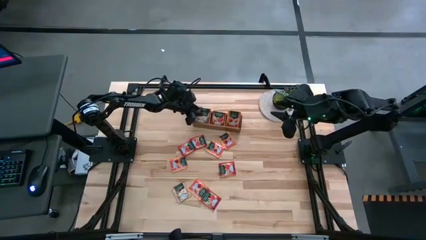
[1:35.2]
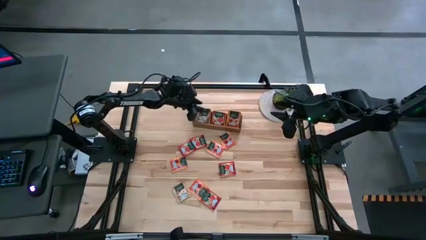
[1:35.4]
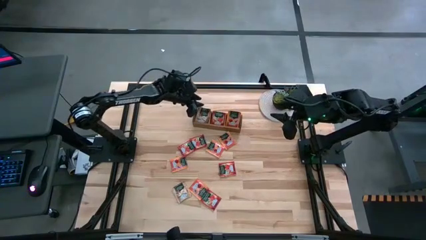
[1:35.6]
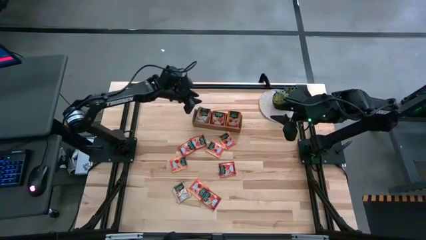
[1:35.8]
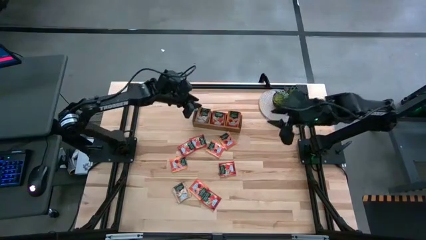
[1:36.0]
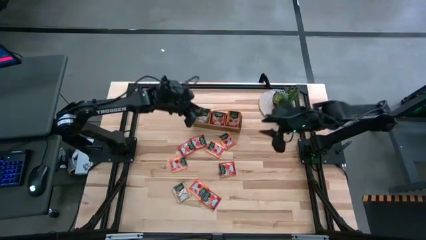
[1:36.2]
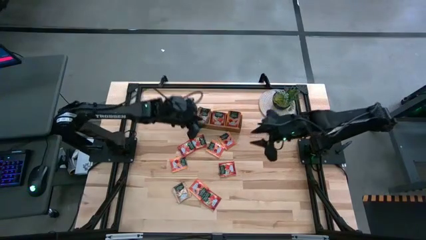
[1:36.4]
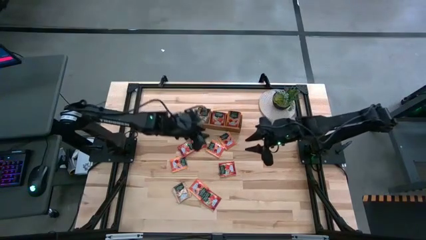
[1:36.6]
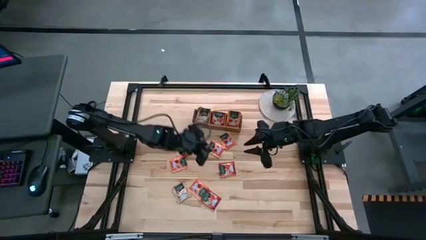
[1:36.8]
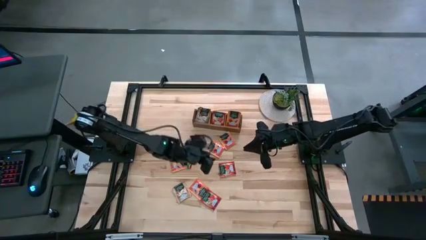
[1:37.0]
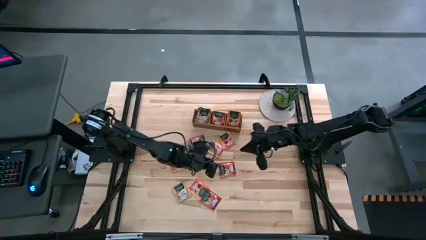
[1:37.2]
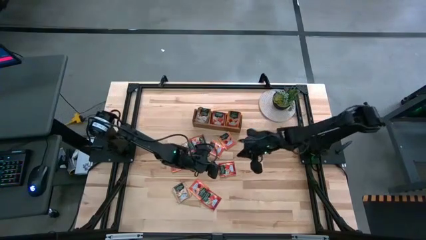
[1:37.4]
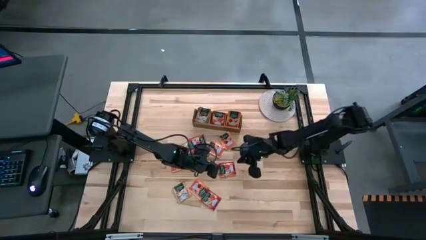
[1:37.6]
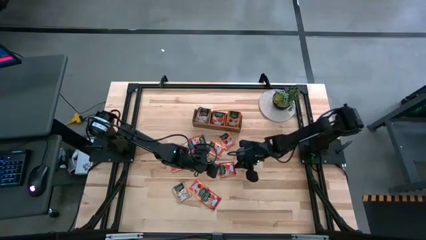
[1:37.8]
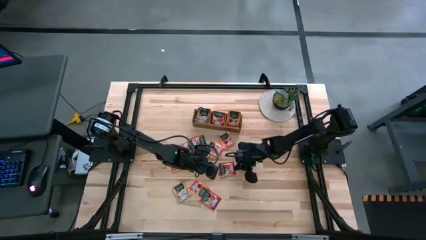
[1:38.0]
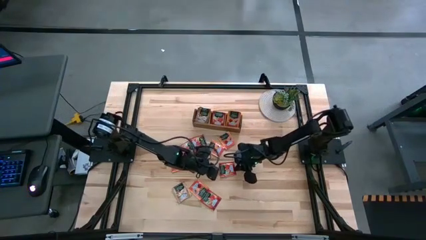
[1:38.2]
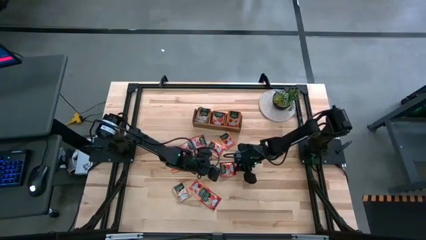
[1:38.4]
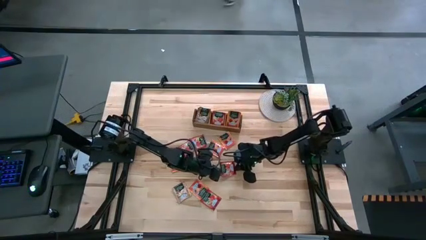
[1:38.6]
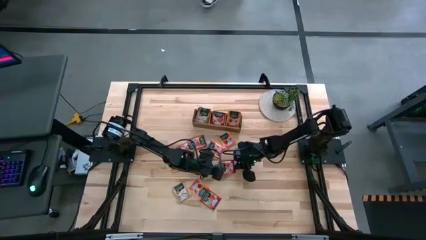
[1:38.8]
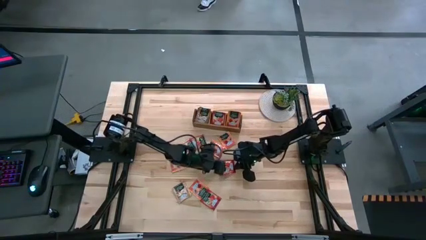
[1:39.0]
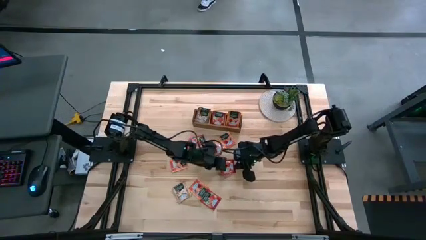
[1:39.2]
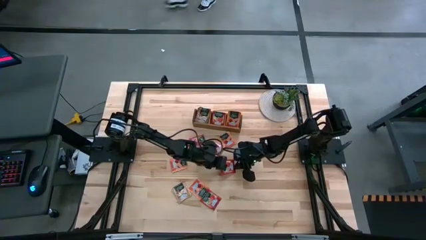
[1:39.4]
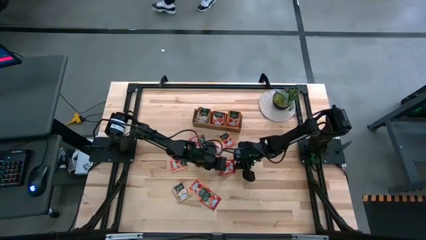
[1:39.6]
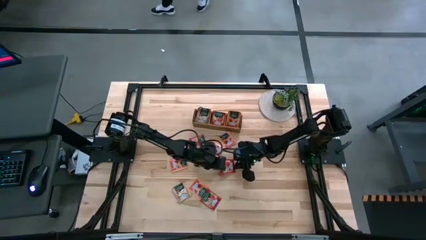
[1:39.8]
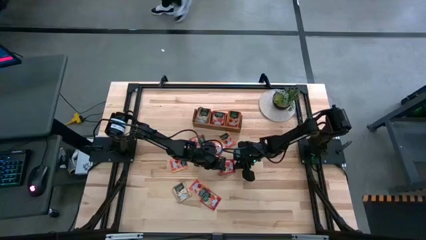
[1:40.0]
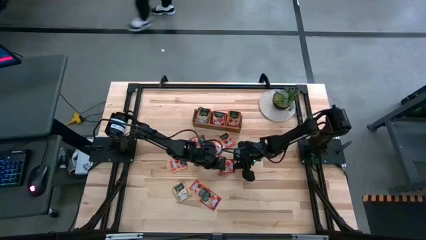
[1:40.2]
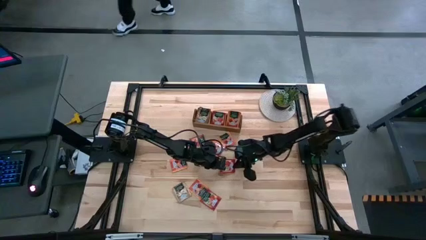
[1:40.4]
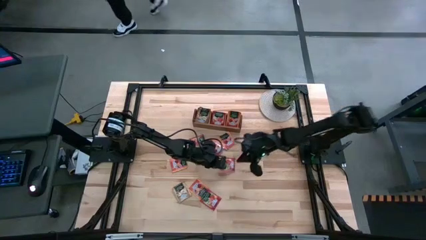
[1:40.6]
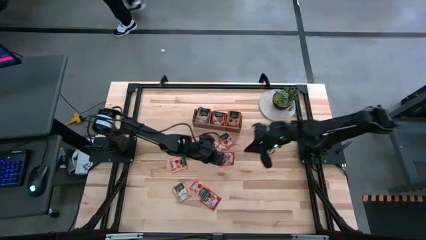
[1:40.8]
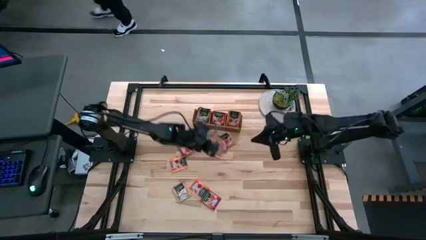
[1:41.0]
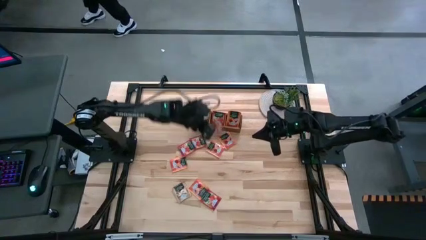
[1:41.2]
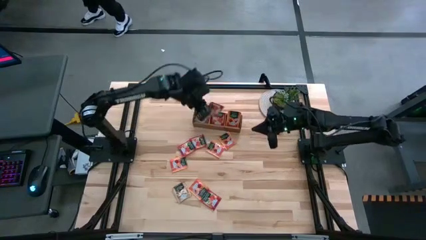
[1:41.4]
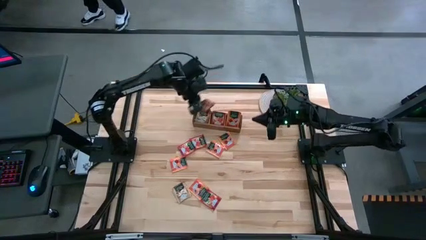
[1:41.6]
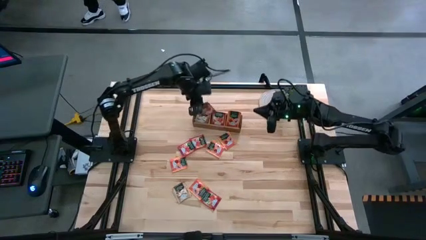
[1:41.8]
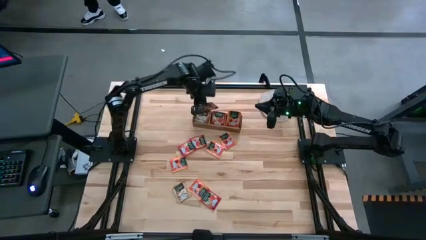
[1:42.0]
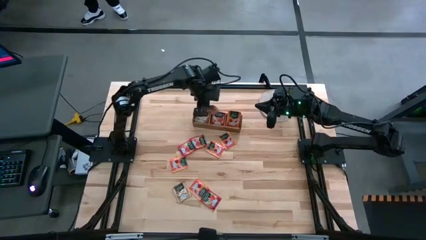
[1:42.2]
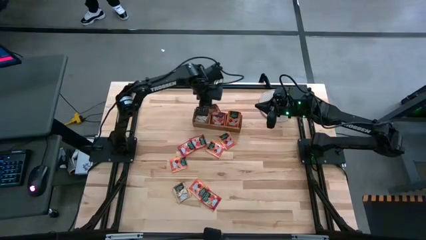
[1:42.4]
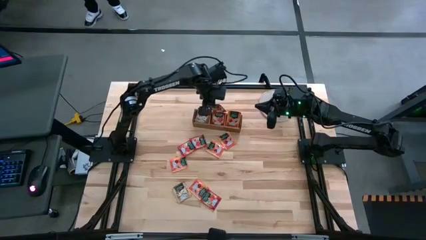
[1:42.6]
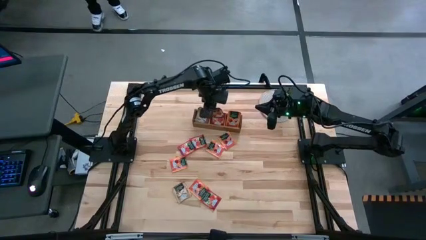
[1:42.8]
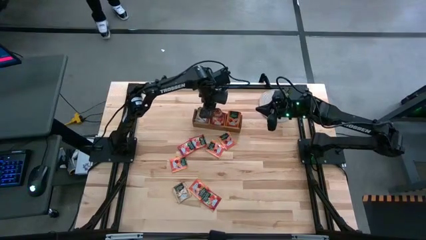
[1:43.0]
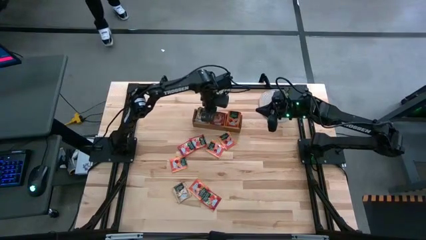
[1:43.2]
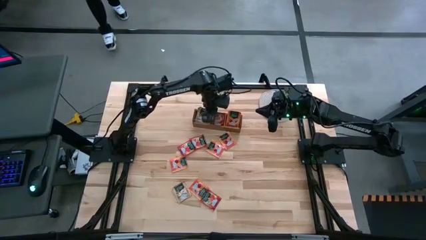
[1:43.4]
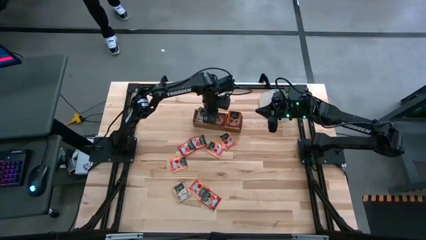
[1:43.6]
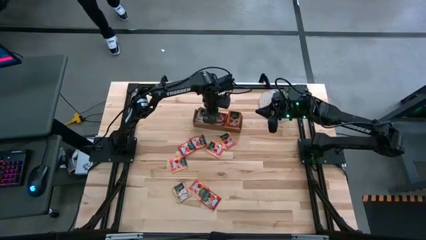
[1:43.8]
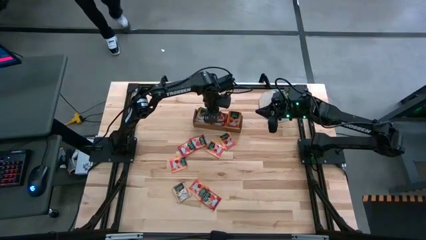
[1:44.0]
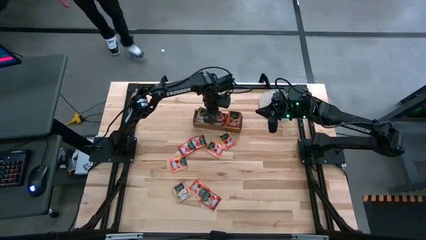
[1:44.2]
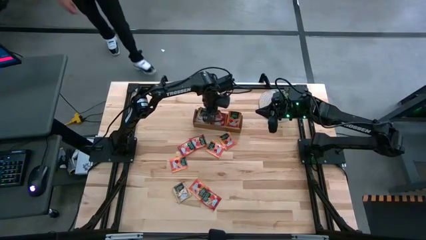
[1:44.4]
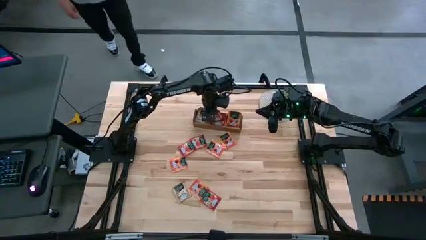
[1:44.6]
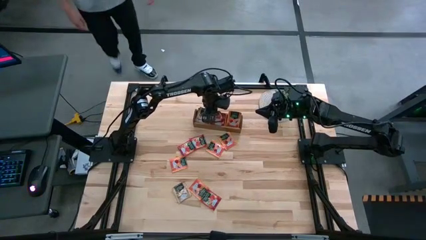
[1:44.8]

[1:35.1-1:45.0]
Task: Pick & Place Tea
Put the red tea bag into the middle section of the wooden organizer

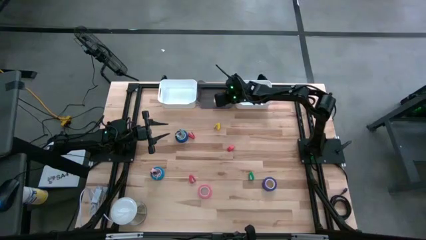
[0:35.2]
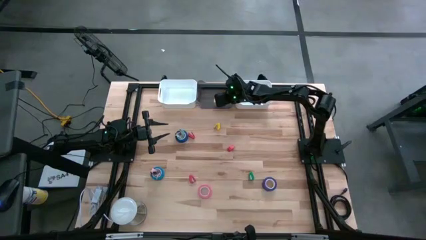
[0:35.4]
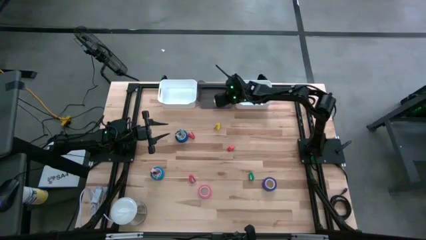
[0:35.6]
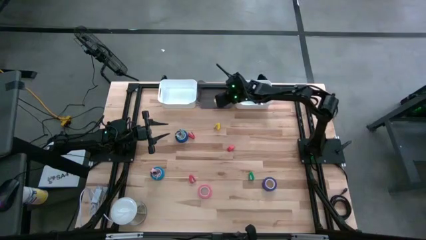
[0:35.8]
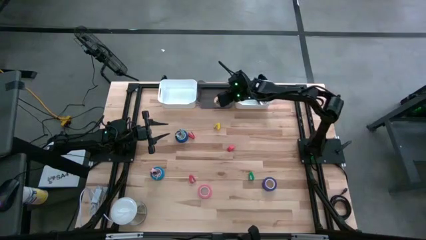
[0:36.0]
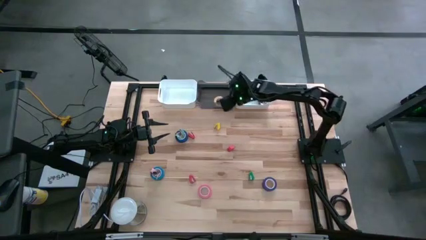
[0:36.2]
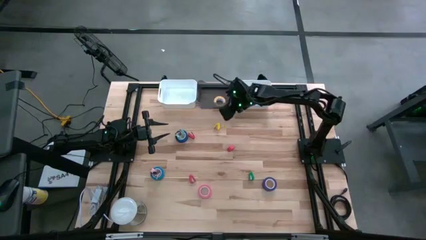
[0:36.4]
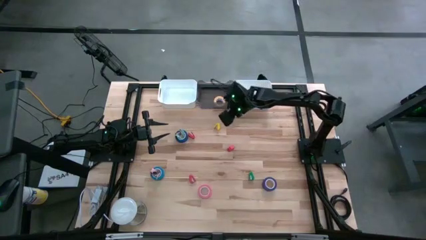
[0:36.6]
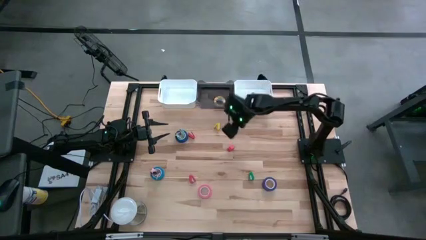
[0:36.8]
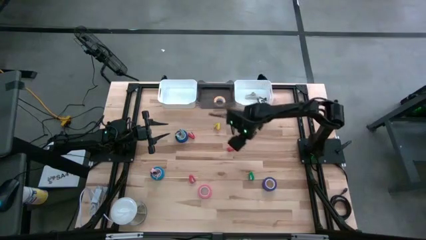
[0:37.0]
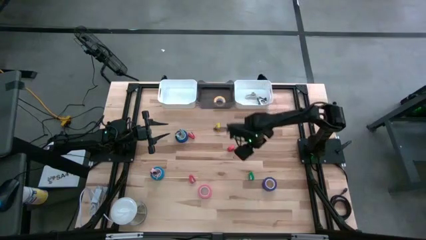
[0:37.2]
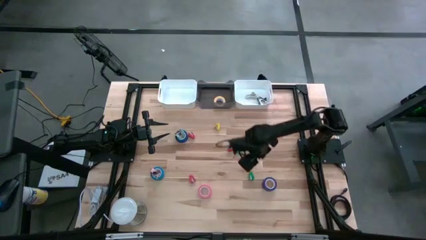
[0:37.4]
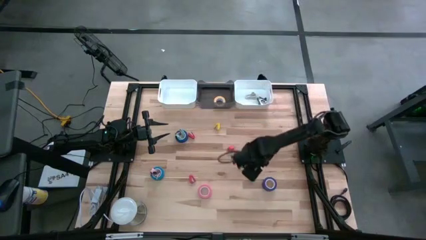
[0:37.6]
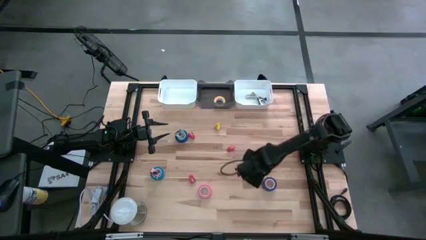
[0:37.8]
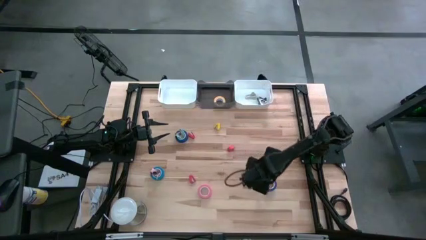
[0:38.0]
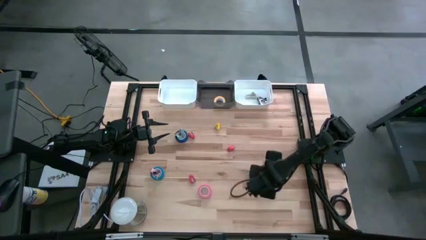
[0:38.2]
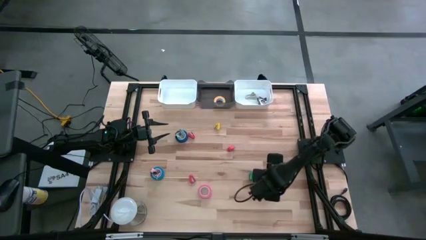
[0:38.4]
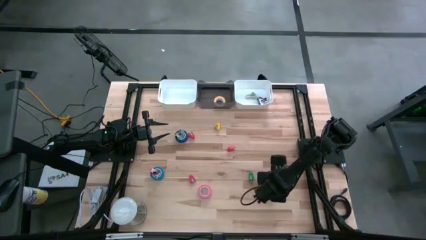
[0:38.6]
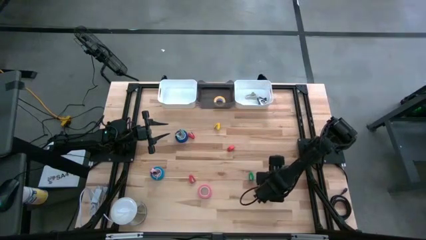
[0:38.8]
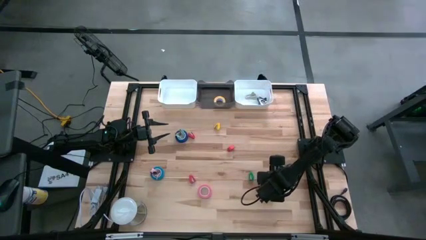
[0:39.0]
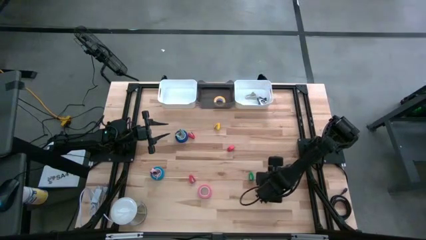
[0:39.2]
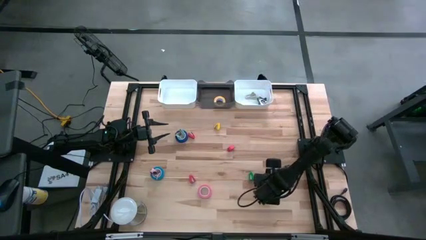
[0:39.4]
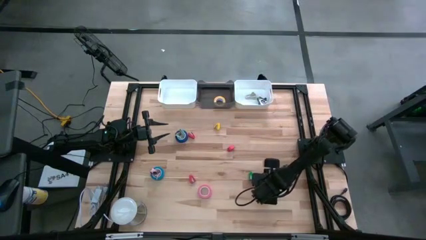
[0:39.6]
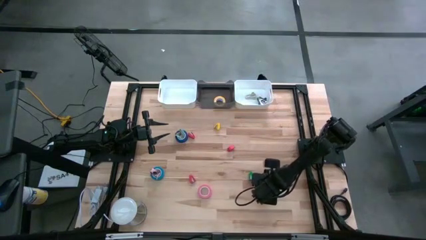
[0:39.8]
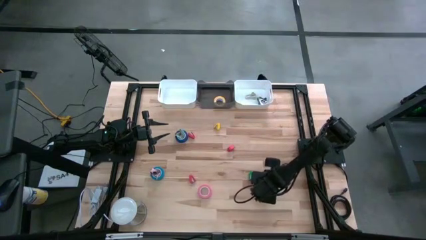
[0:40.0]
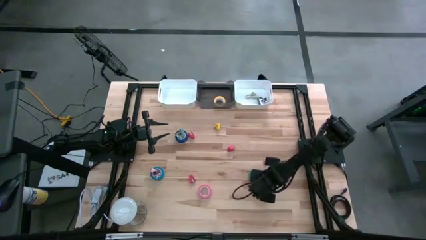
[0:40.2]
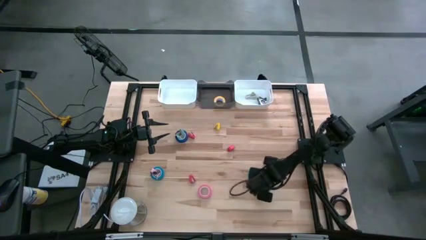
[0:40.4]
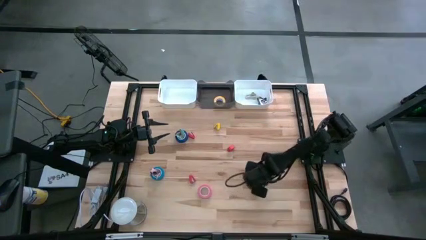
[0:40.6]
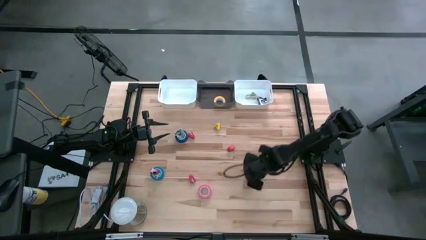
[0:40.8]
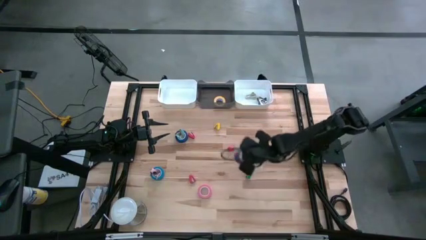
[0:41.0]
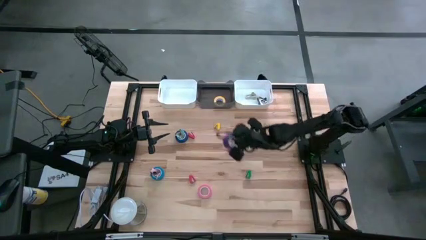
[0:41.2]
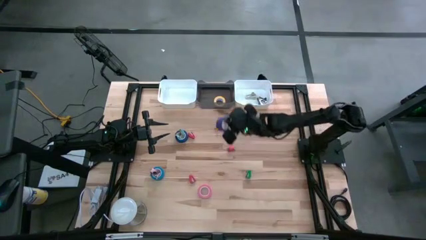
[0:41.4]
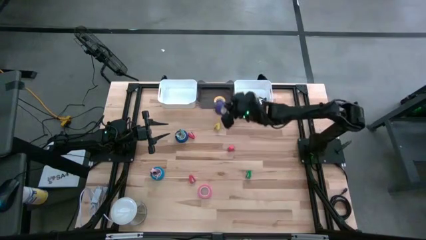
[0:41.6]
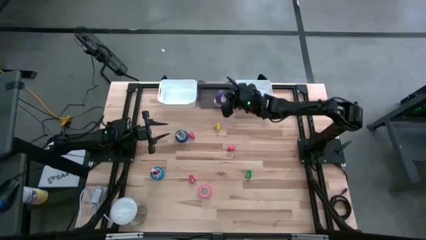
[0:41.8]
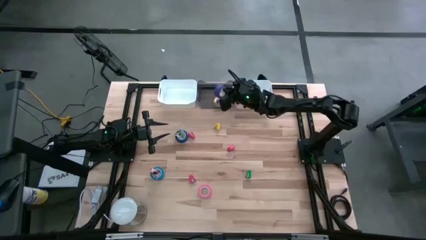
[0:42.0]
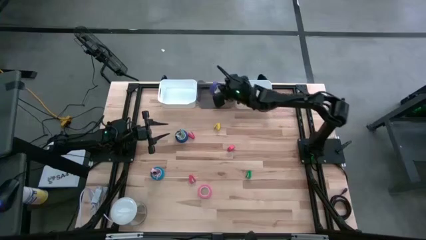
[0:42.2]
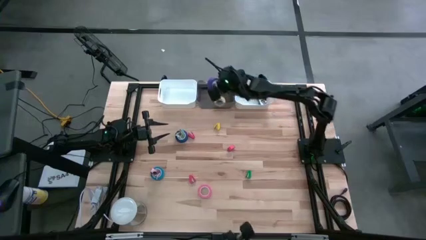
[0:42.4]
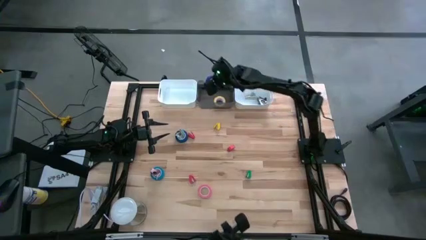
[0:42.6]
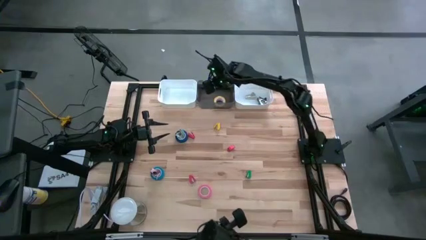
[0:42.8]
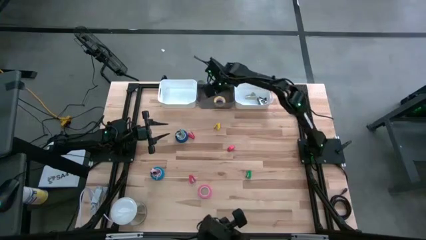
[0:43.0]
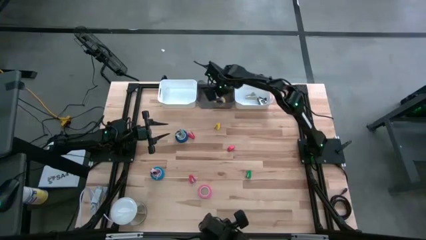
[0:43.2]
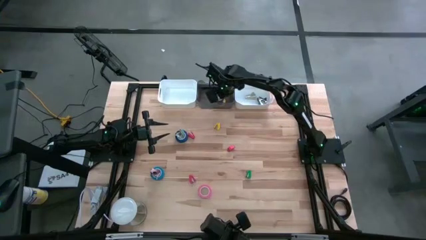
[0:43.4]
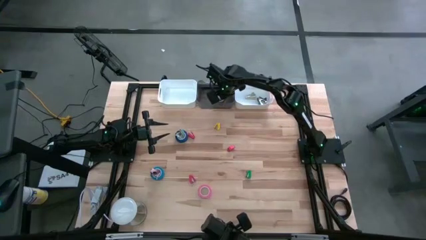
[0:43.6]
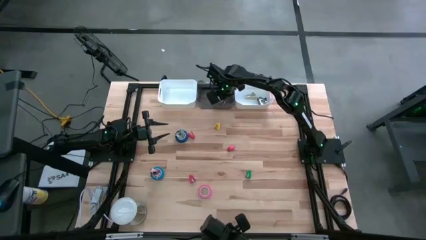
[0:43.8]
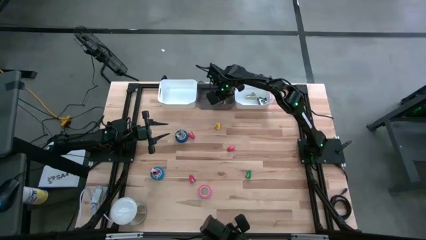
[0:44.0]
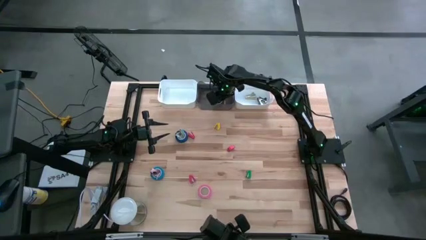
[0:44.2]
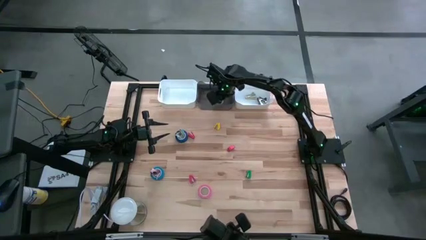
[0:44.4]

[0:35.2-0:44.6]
Task: Pick and place Stapler, Stapler remover, tape
Put the violet tape into the black bin
